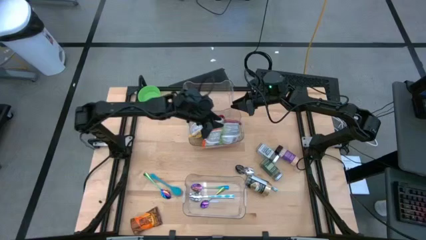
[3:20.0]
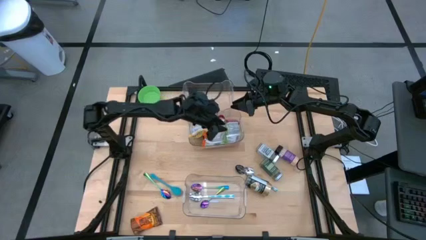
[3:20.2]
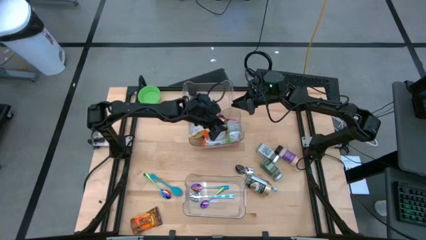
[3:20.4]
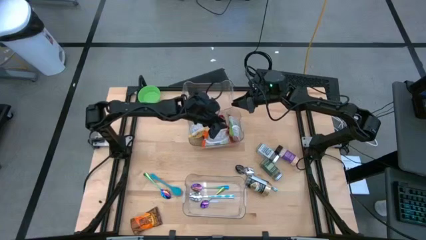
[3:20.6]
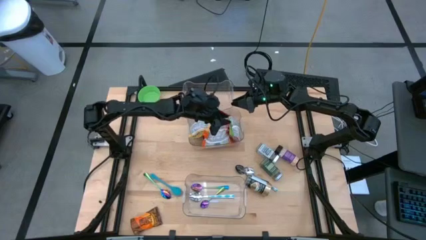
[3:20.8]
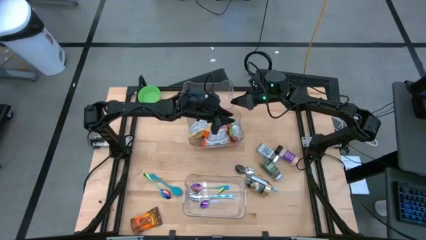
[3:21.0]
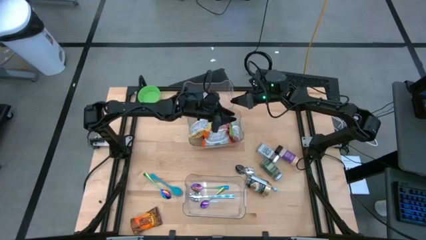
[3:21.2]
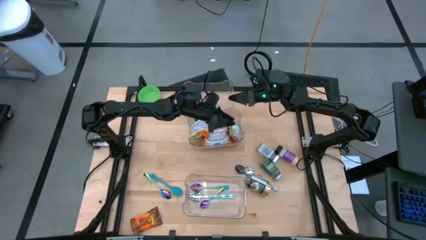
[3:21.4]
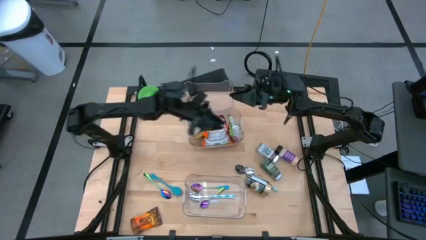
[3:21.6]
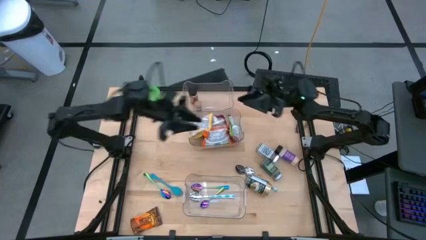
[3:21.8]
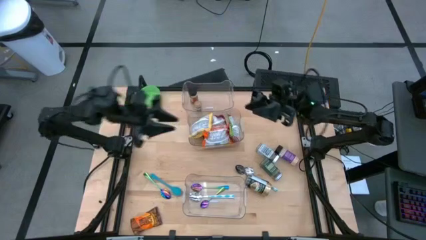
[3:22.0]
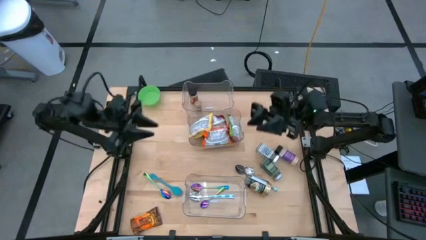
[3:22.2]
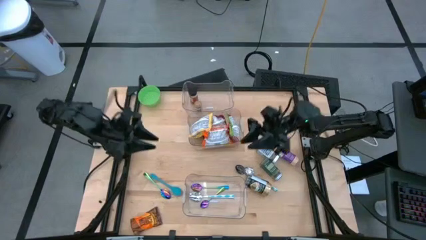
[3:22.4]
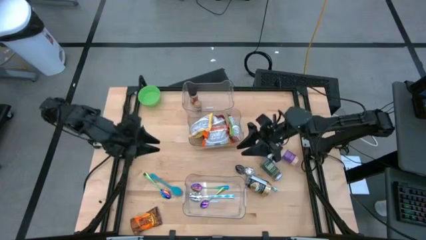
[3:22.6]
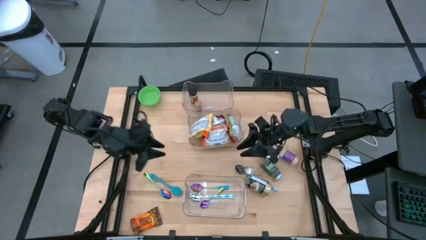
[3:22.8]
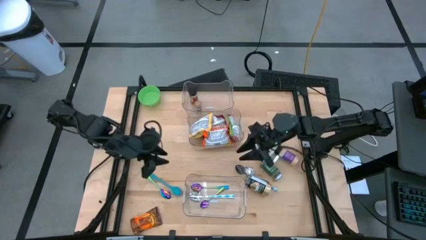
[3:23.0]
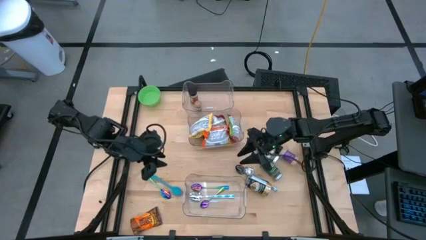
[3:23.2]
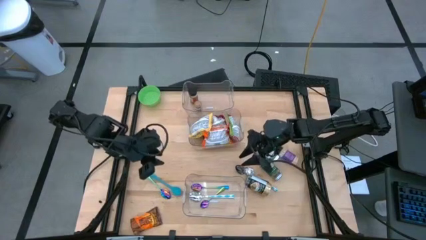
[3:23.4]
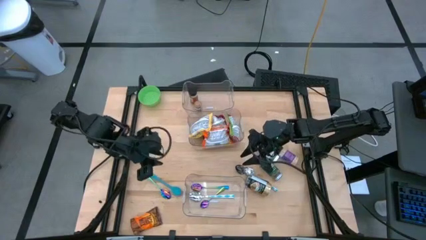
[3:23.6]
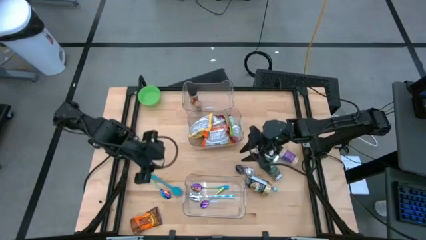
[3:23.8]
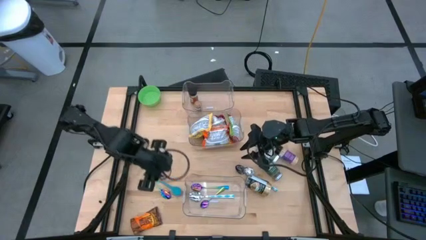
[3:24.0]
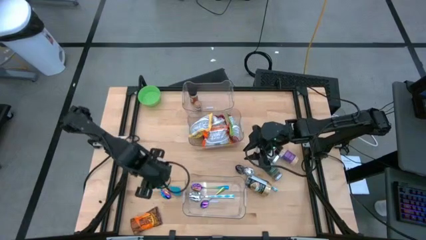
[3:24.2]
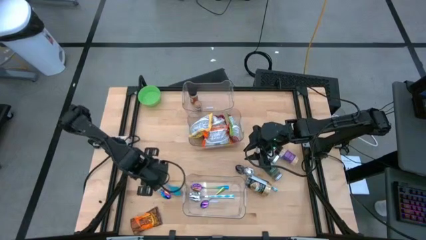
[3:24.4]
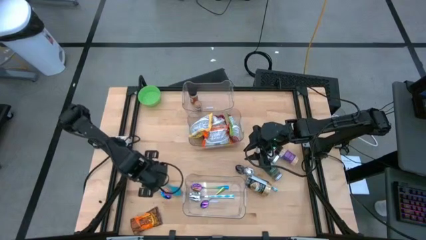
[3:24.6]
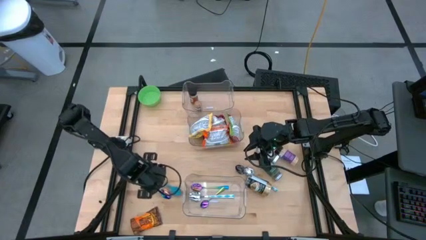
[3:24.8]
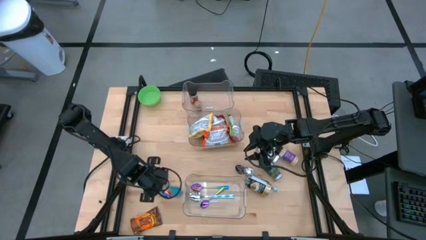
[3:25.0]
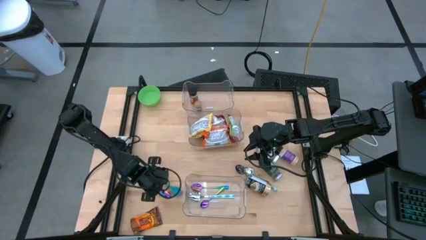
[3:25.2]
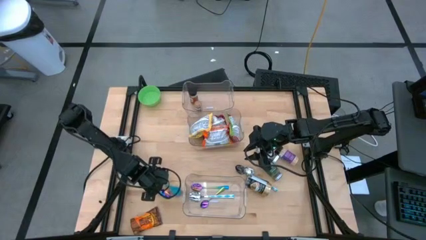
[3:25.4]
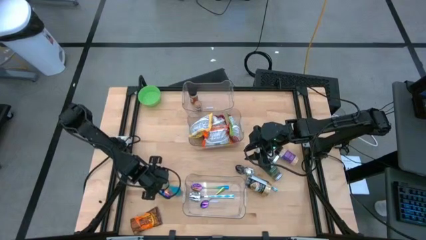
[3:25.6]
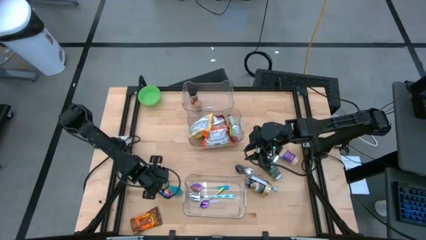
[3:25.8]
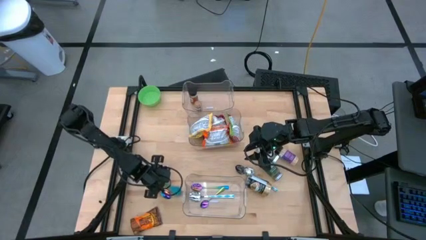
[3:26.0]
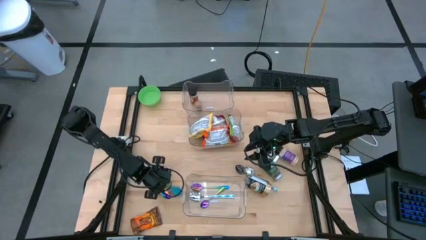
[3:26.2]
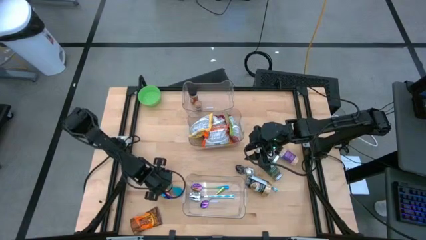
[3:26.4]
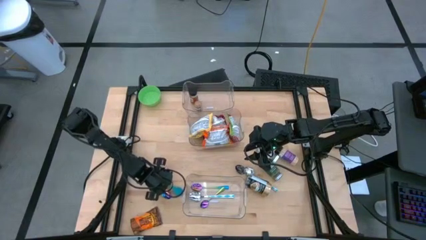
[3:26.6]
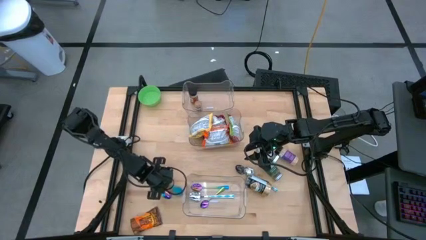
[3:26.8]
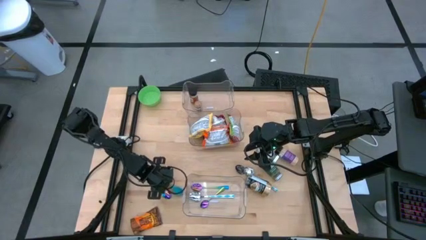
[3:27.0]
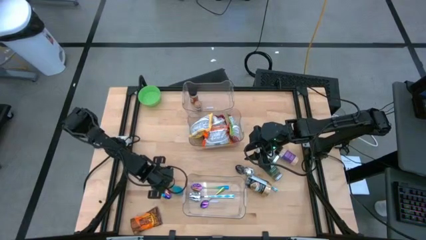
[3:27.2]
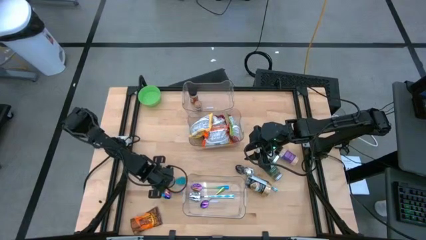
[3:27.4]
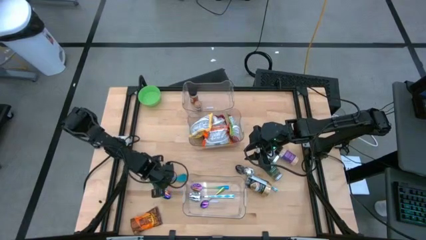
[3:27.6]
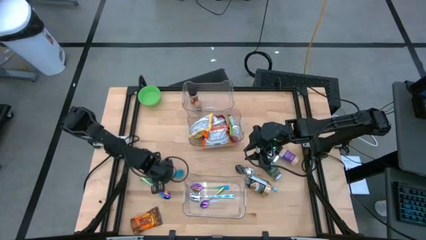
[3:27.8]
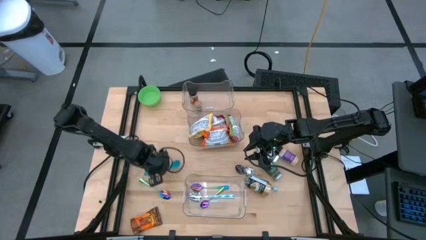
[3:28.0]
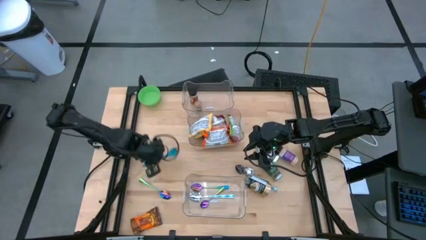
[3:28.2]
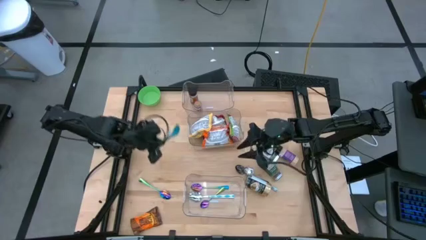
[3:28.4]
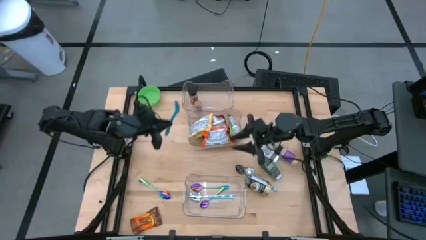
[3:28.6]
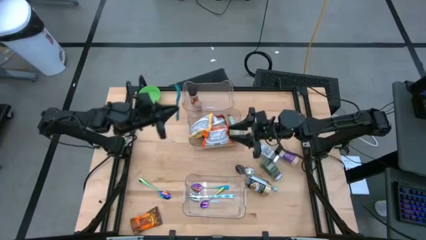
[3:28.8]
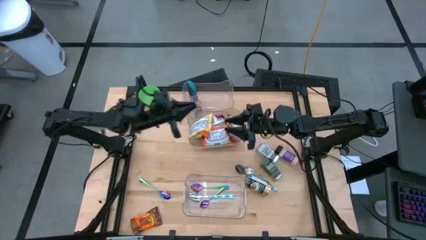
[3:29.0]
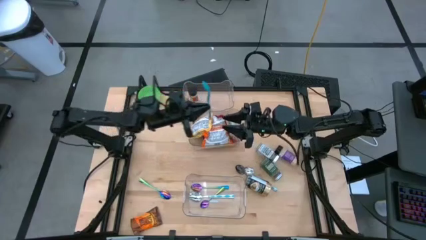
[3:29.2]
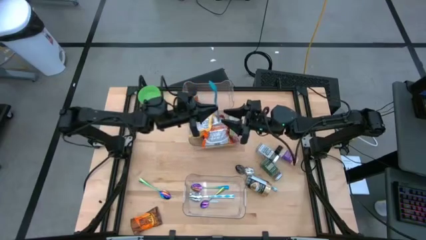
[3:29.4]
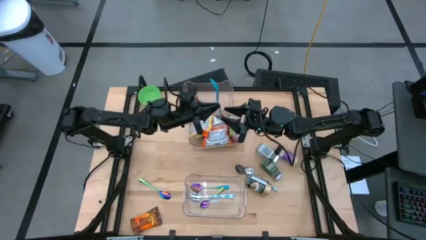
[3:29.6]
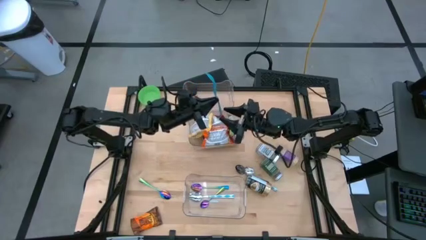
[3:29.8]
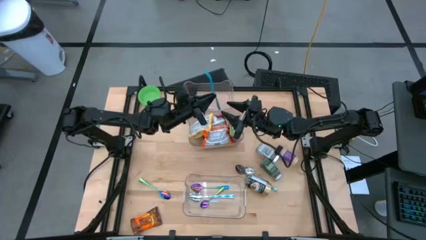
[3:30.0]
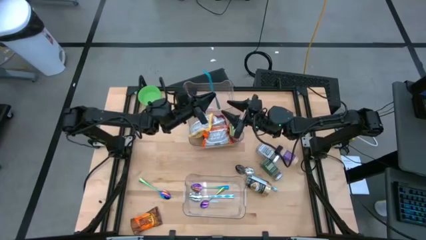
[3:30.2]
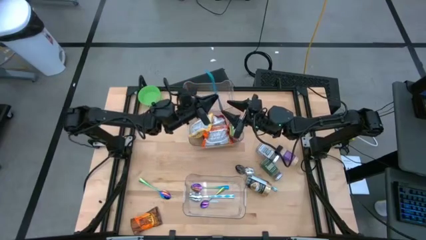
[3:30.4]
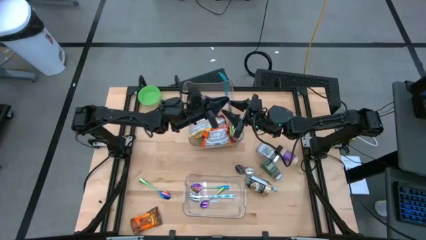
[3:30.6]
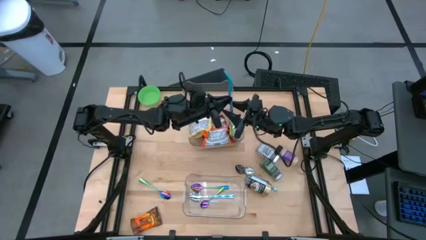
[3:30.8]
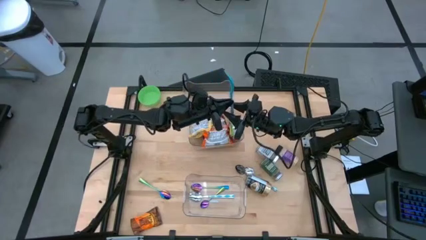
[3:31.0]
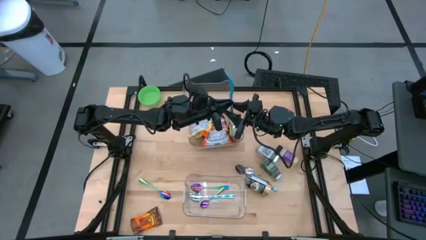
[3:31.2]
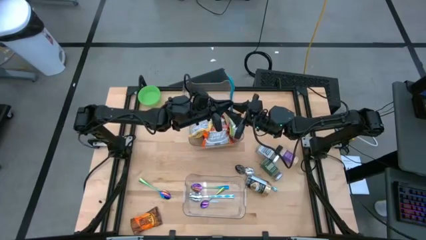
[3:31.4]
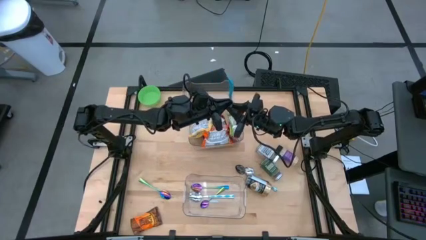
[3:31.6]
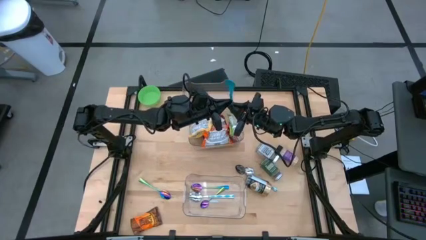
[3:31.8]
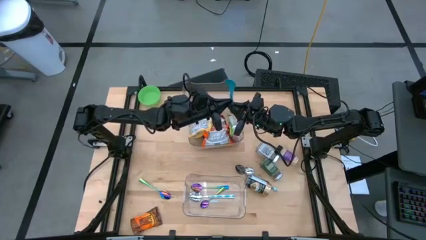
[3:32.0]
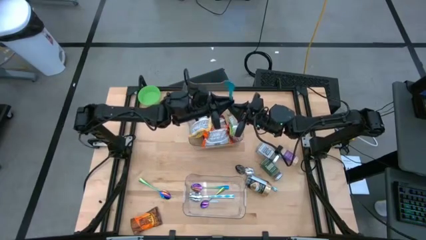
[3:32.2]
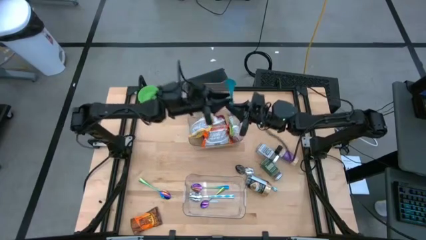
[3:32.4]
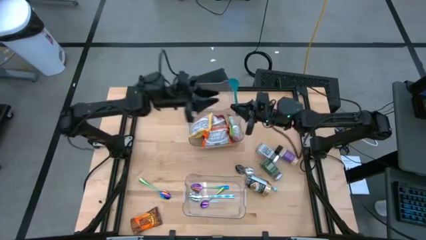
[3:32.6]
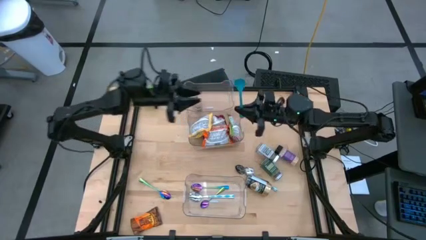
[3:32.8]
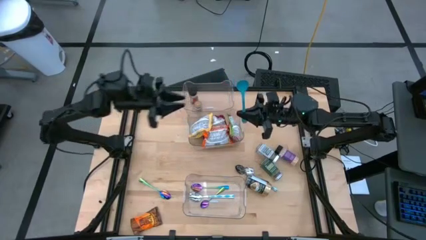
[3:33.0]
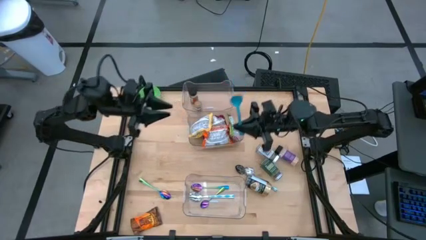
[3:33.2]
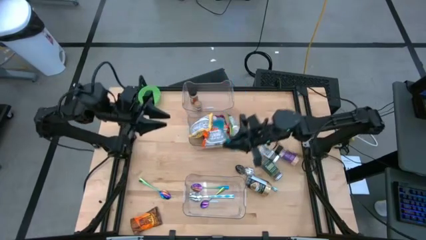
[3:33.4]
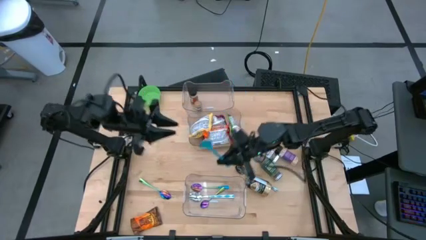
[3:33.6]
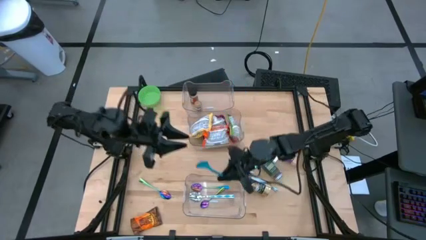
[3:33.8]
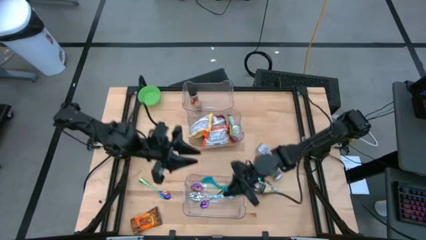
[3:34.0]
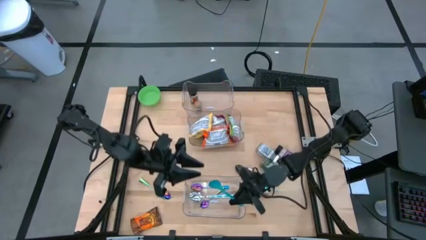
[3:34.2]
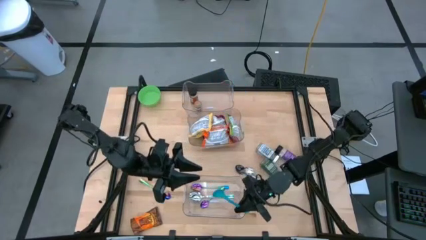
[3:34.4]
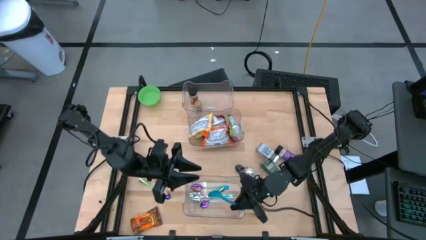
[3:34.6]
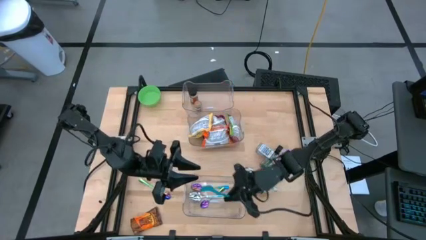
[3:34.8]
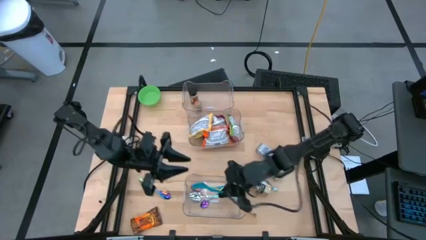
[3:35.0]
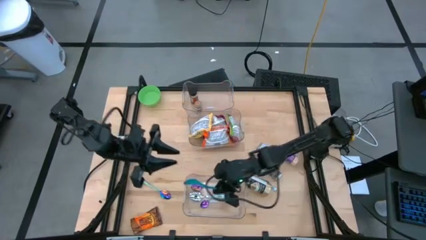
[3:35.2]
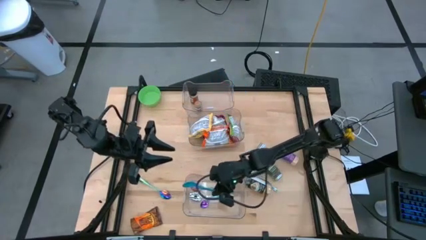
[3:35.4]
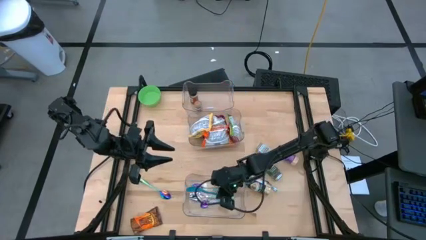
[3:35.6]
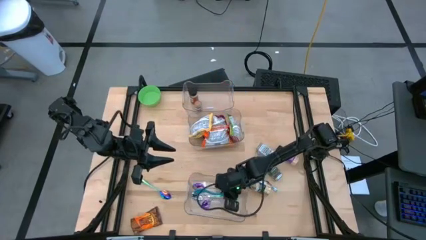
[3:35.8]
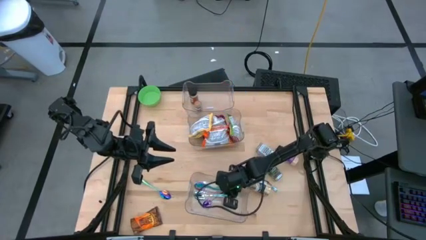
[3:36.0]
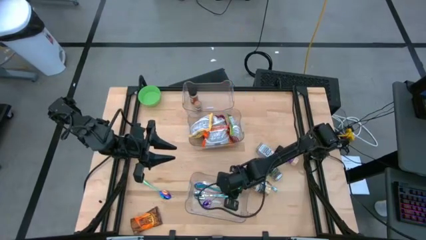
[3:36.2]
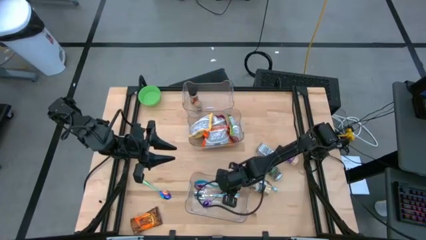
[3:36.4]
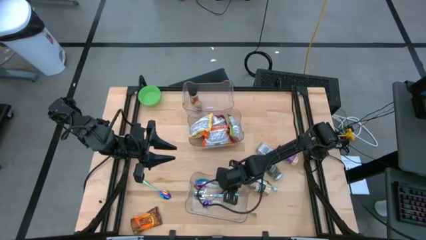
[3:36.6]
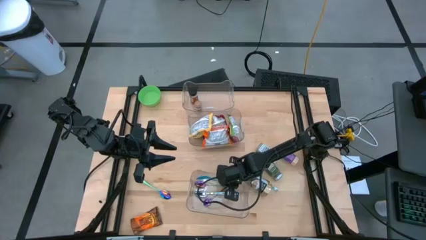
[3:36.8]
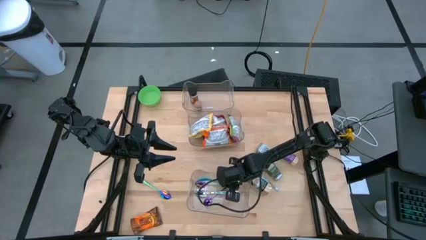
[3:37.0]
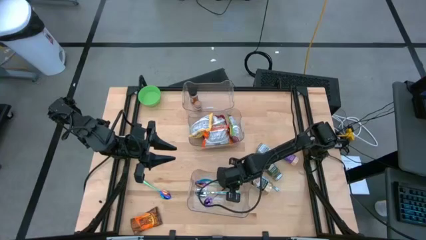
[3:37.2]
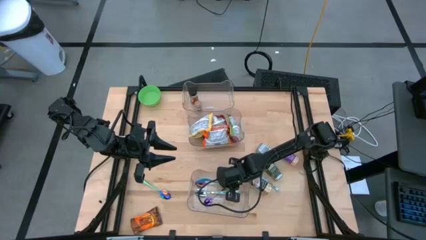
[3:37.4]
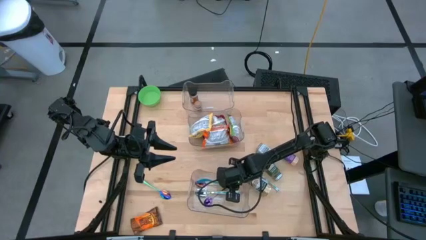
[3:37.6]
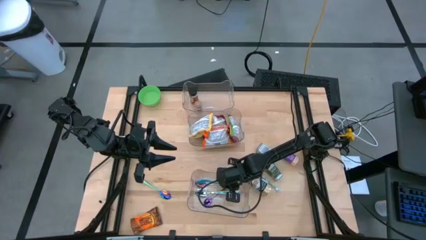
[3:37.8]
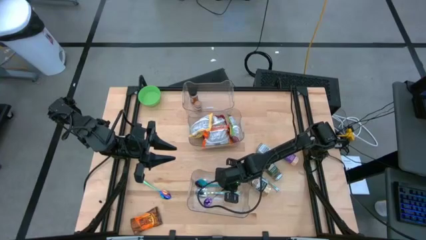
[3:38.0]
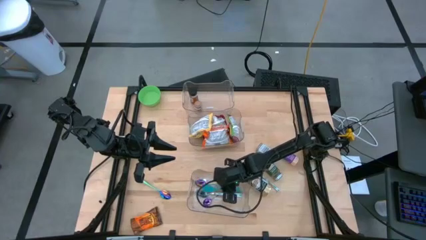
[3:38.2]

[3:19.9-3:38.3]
Task: Pick & Place Food Item
Put the light blue spoon into the bottom transparent bin
